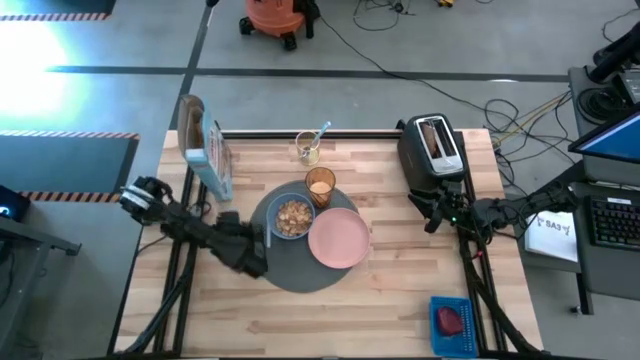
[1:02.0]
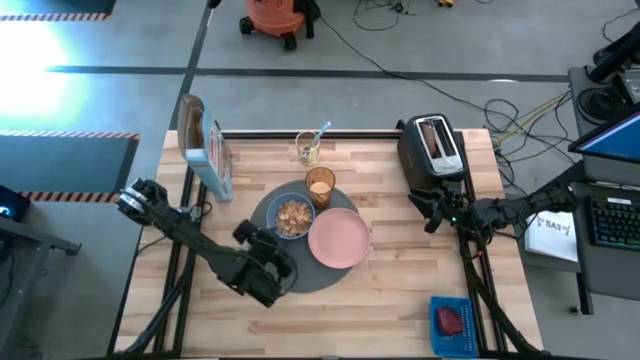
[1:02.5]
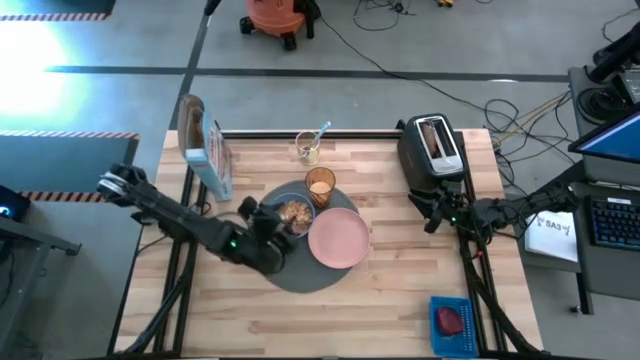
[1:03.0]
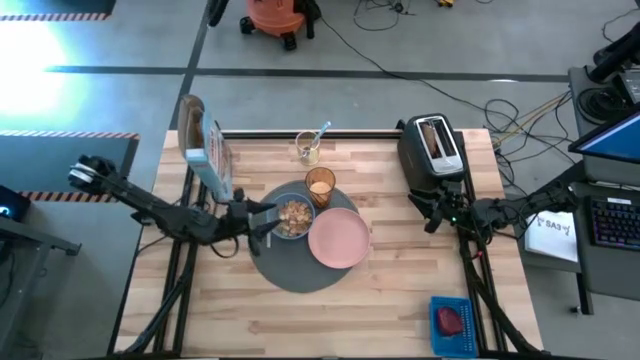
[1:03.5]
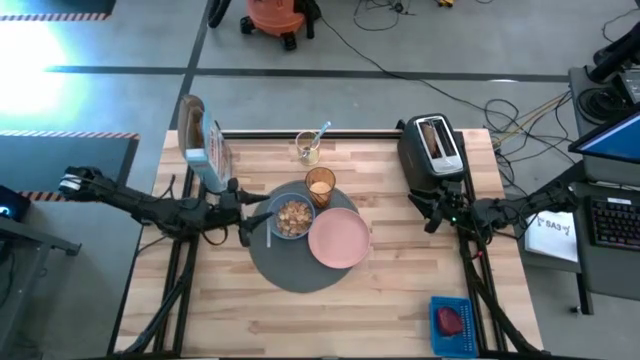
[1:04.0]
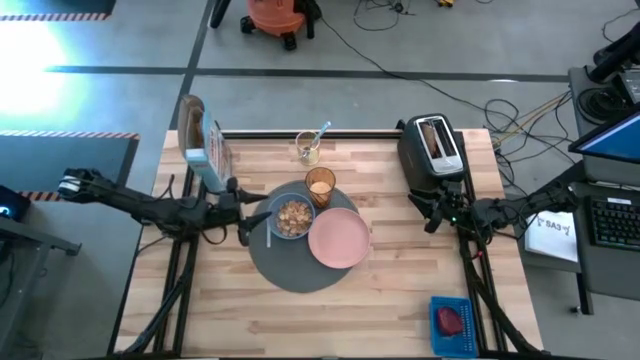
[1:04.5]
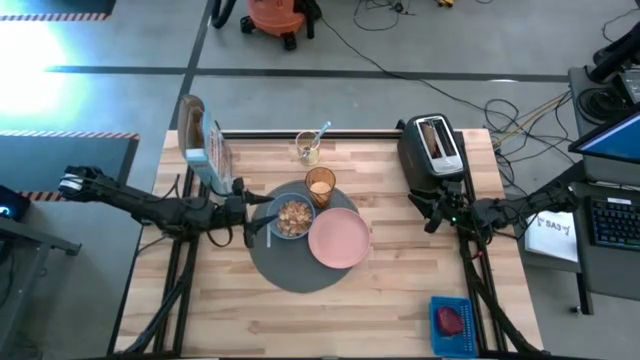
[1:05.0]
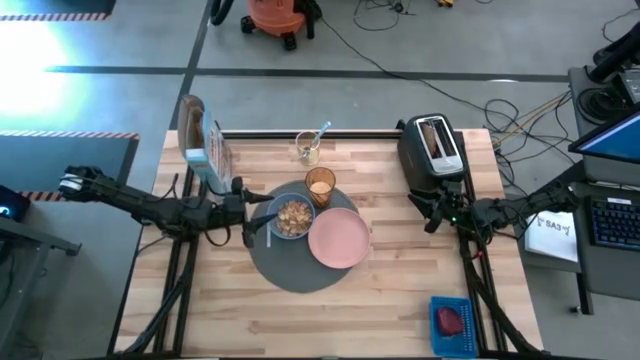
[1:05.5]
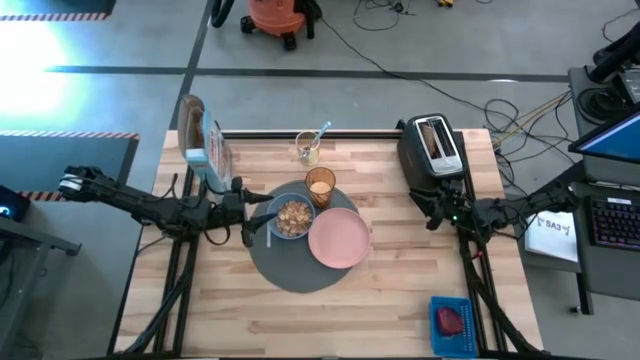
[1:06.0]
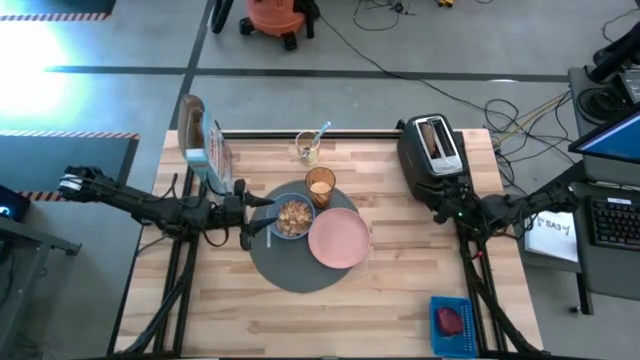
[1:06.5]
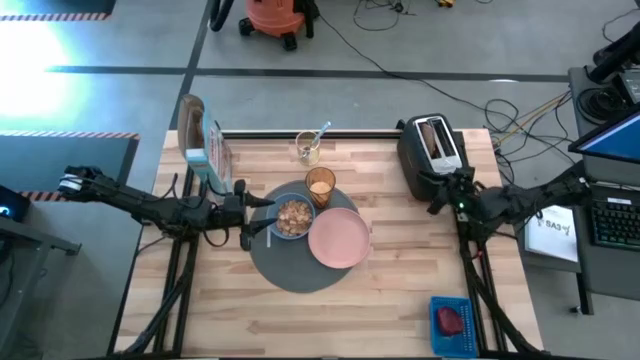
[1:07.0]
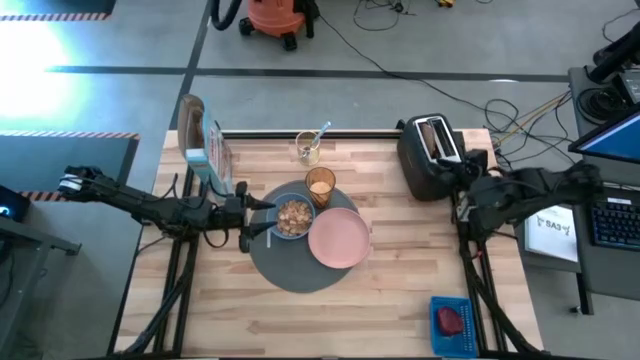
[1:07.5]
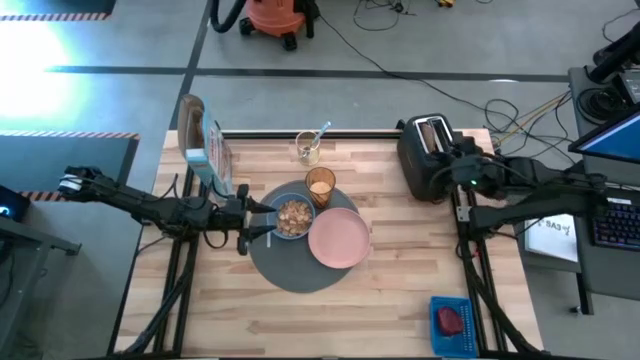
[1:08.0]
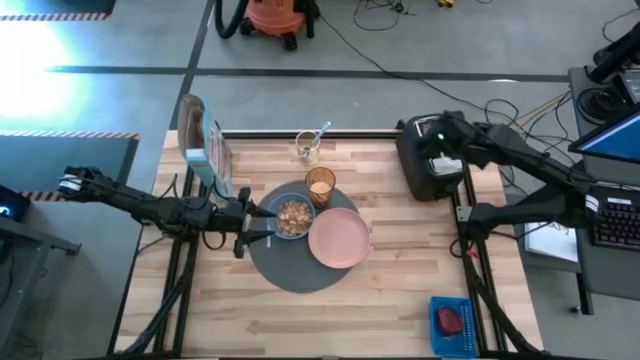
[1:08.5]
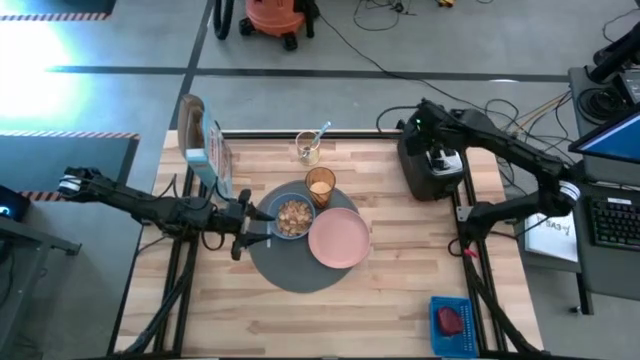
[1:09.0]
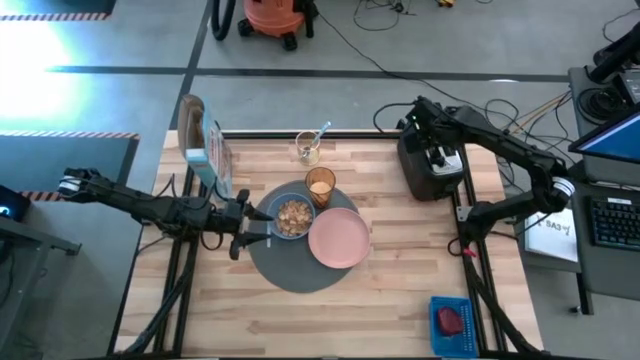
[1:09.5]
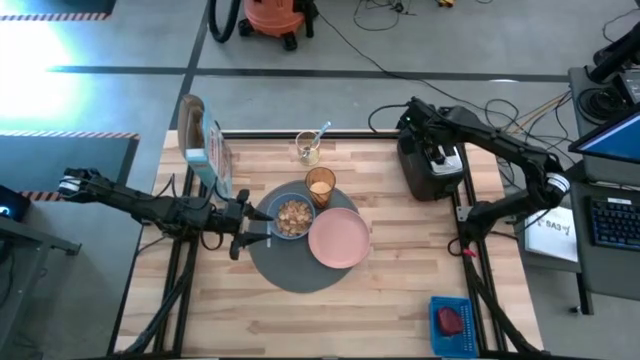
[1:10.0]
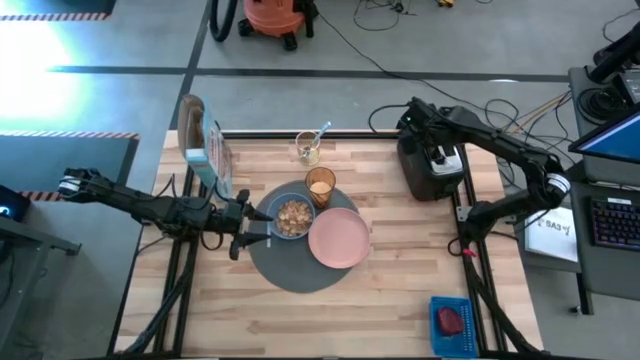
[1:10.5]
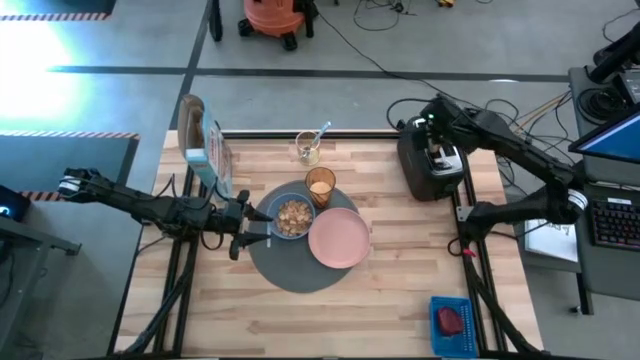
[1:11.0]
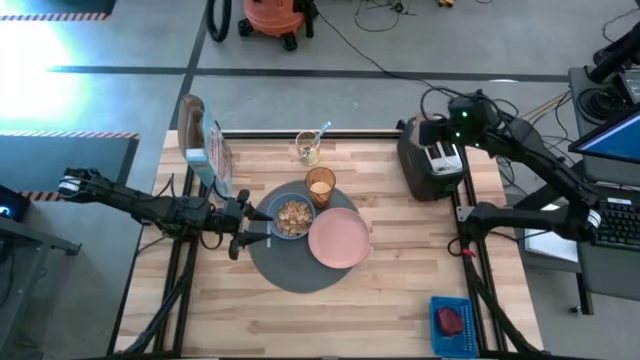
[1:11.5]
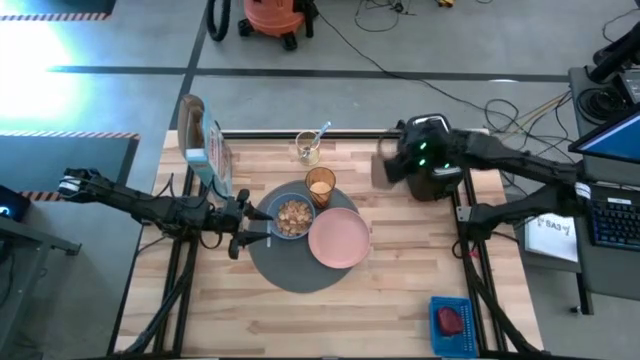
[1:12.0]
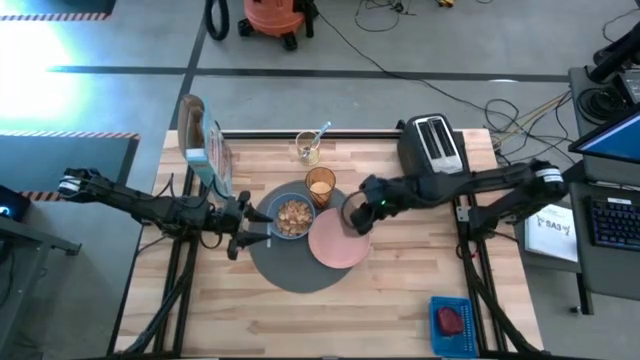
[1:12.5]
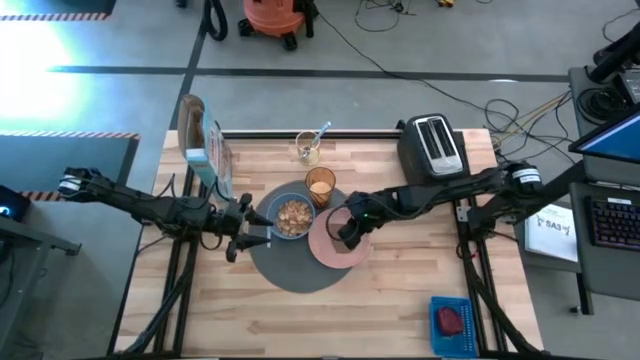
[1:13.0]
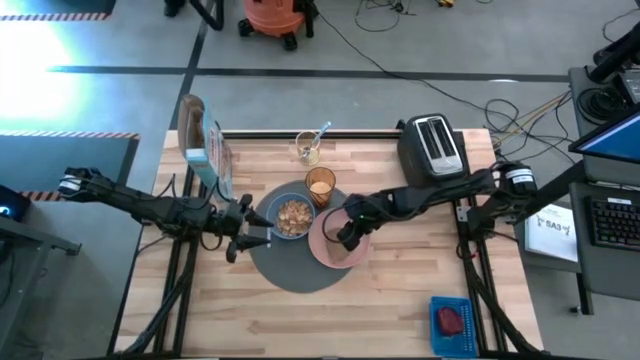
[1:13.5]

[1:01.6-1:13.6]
Task: Arrange a breakfast setting
Put the bread on the pink plate

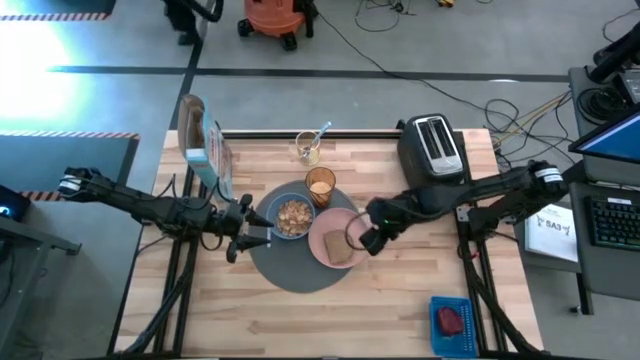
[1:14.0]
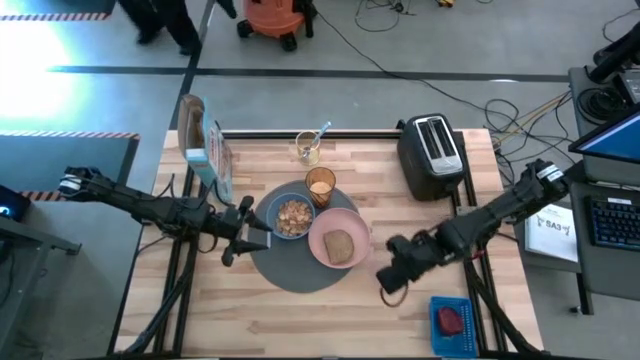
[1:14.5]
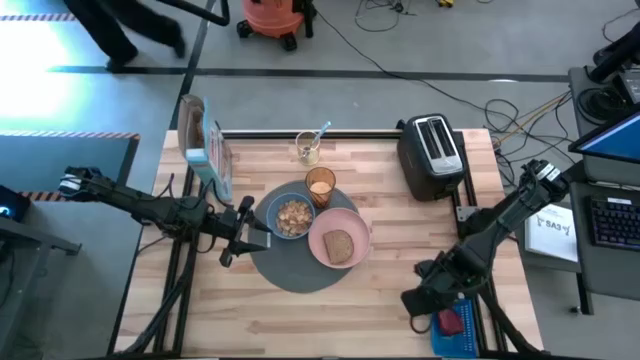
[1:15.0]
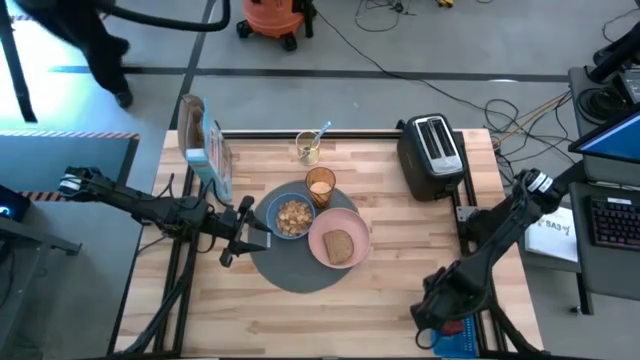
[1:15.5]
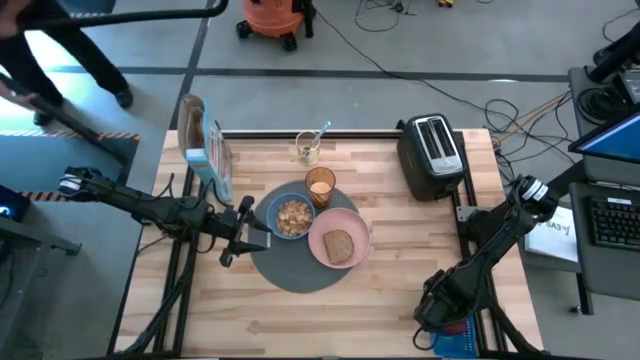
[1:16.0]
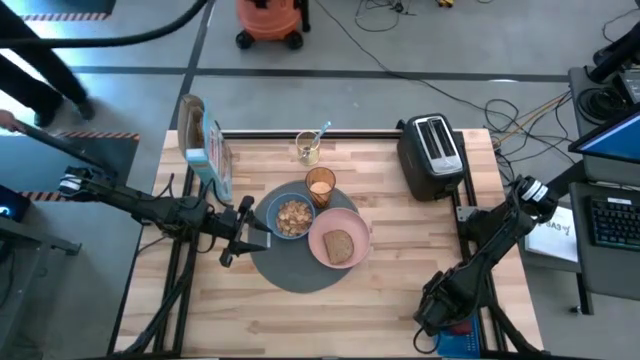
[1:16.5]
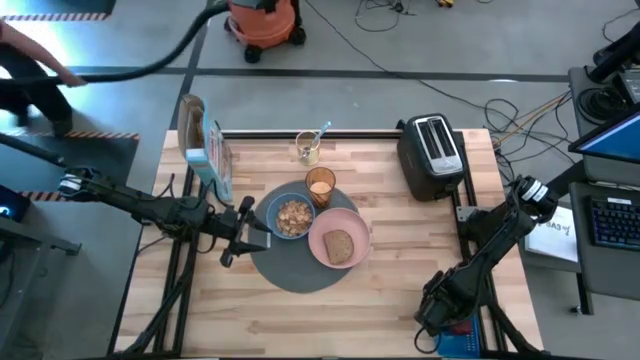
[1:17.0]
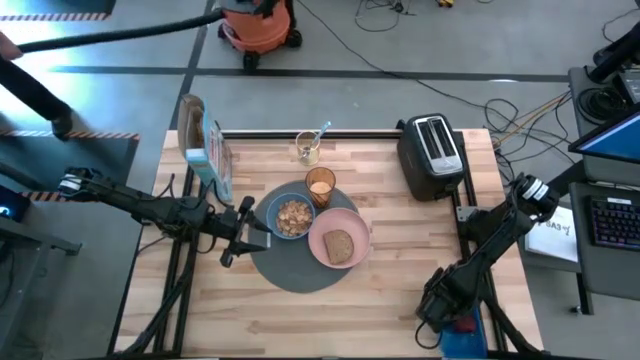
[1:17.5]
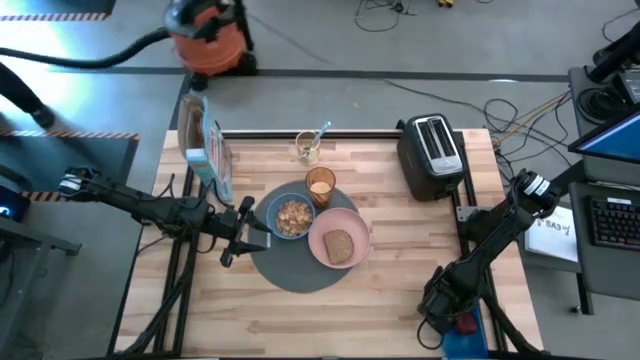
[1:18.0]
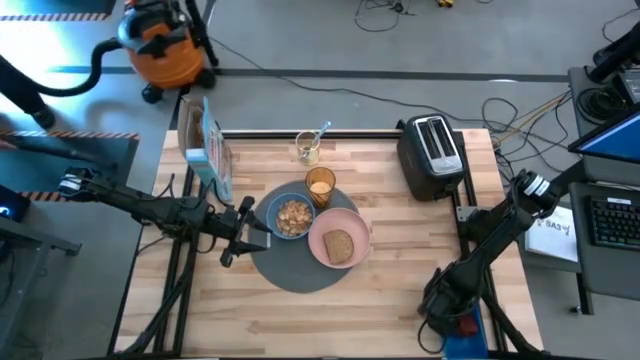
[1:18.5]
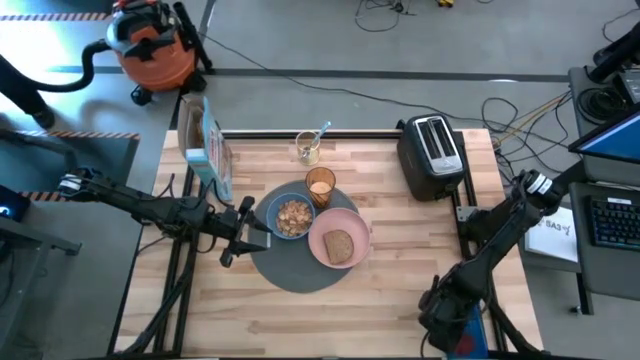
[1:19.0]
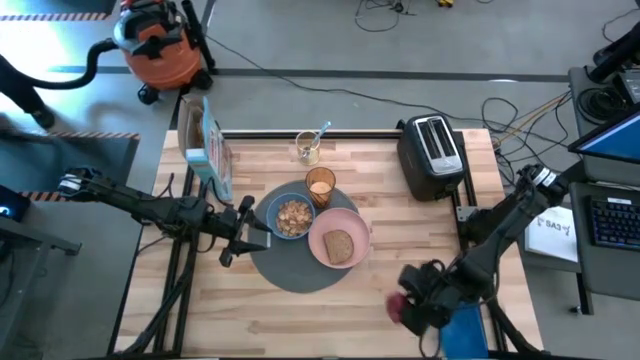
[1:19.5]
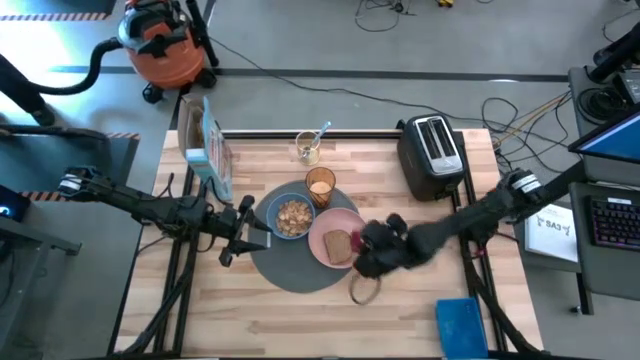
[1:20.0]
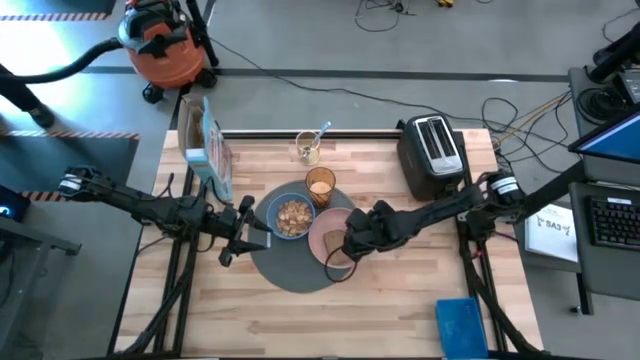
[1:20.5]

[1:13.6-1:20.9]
Put the apple on the pink plate

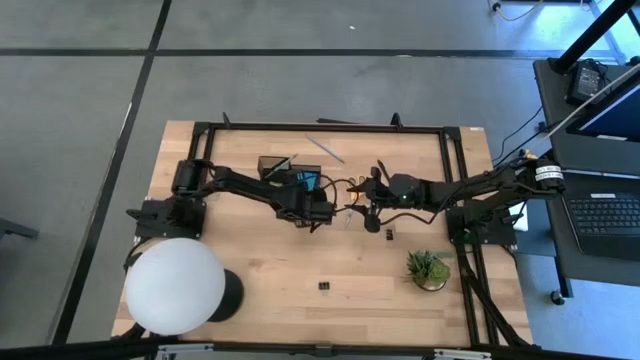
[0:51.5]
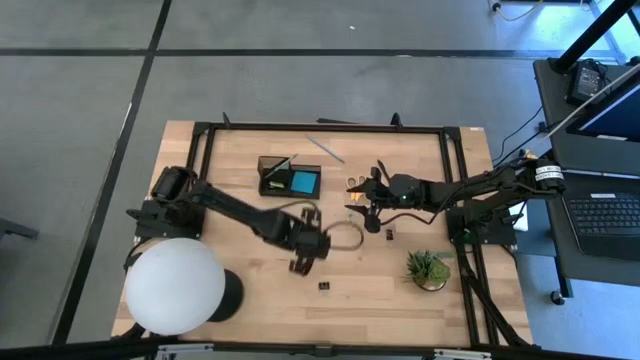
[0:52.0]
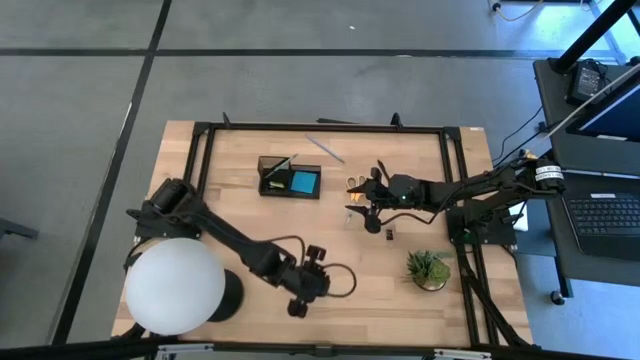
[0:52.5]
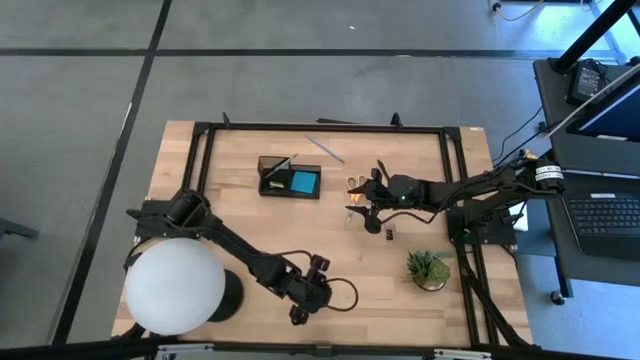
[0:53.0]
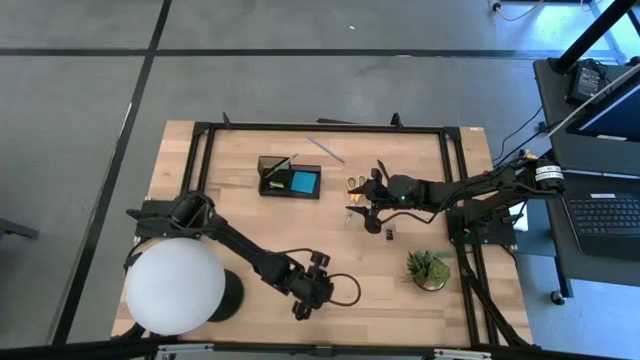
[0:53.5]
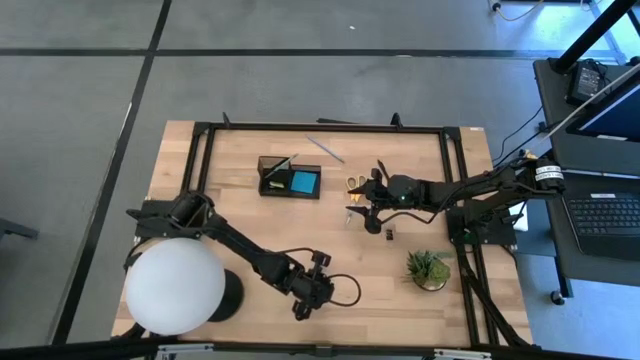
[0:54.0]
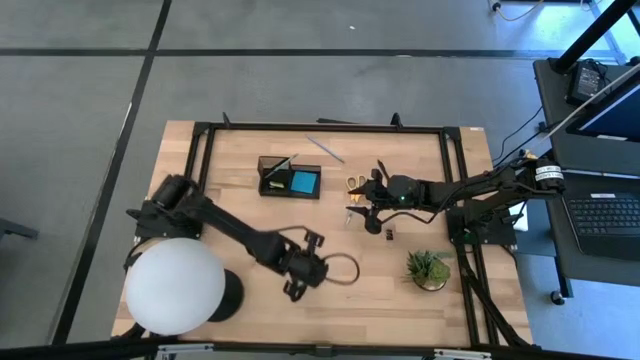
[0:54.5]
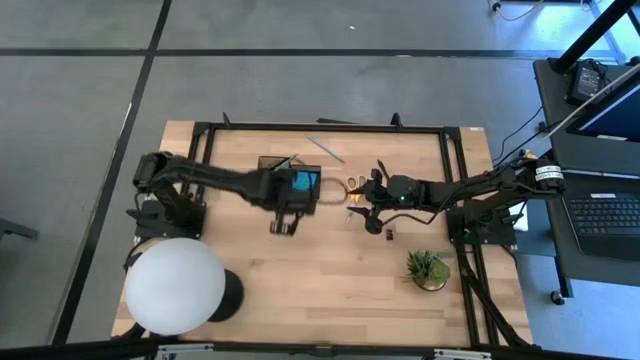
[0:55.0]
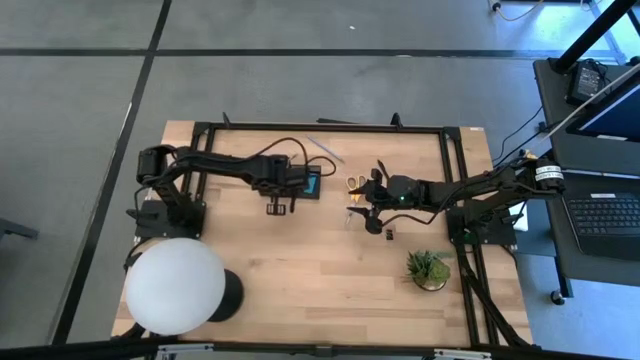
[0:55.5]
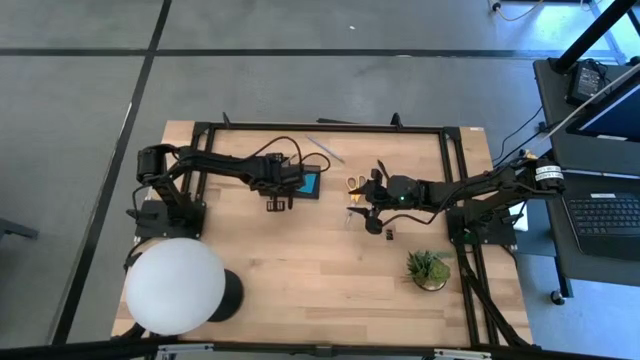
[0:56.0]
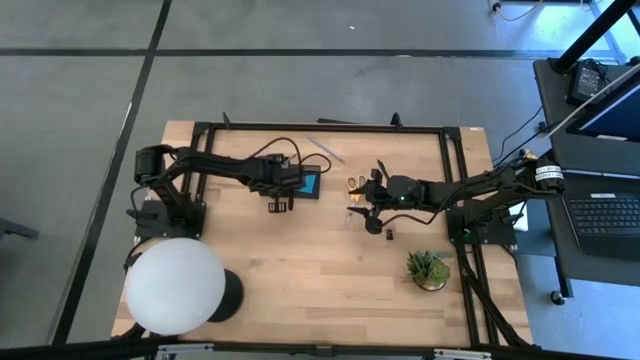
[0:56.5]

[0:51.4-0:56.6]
Task: Pick and place office supplies into organizer
Put the bottom black binder clip into the black desk organizer
